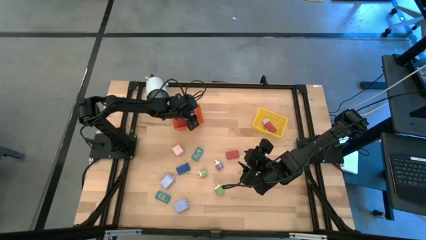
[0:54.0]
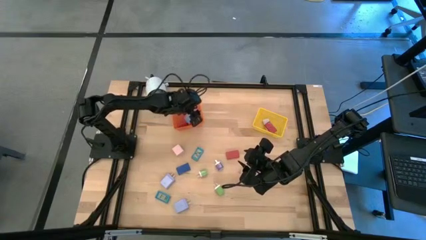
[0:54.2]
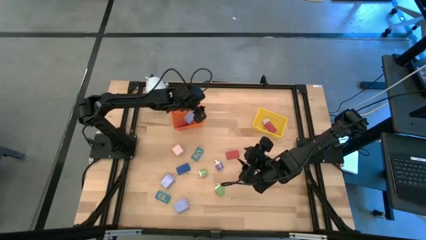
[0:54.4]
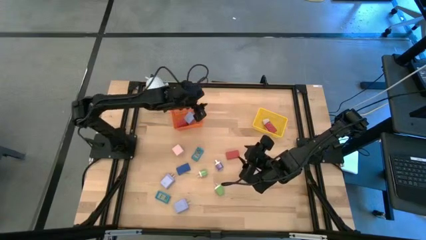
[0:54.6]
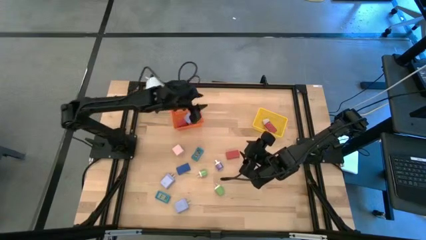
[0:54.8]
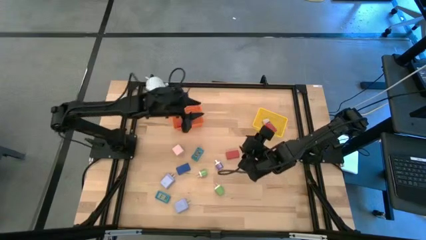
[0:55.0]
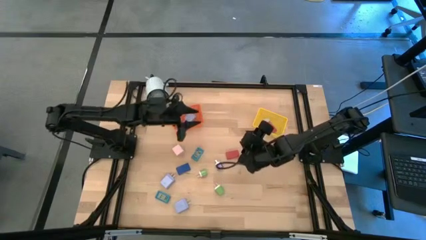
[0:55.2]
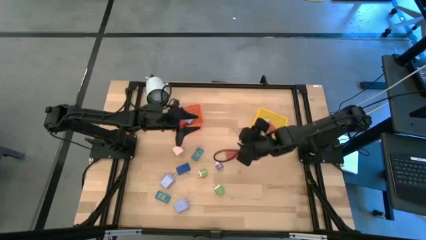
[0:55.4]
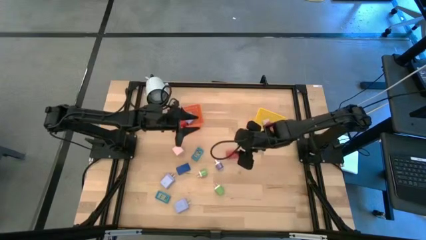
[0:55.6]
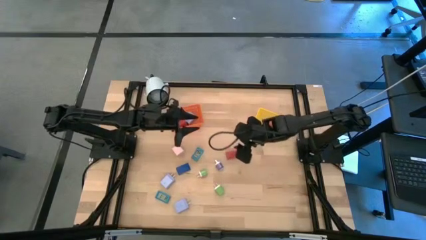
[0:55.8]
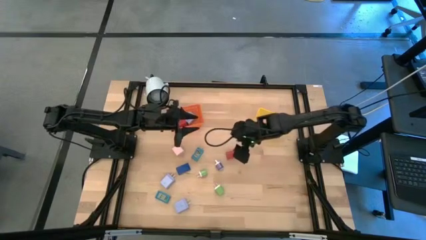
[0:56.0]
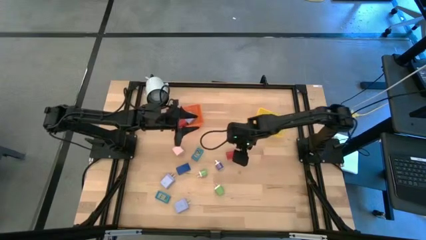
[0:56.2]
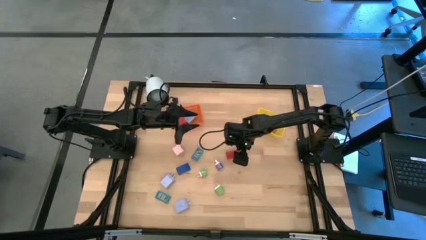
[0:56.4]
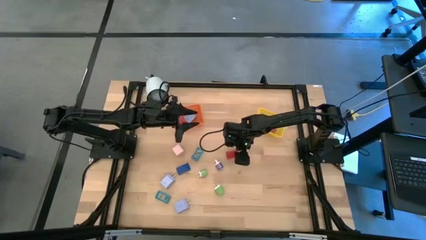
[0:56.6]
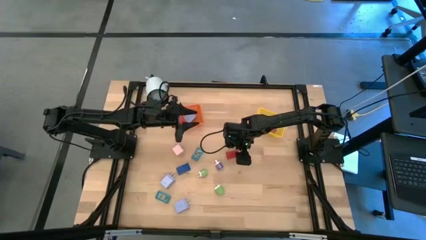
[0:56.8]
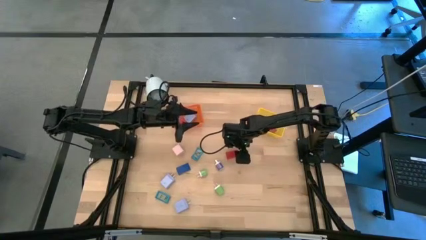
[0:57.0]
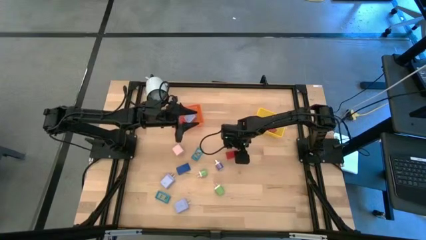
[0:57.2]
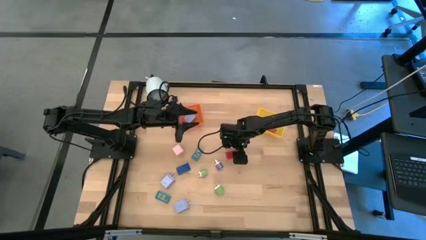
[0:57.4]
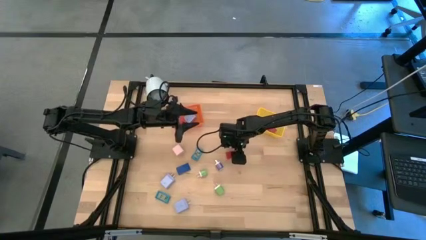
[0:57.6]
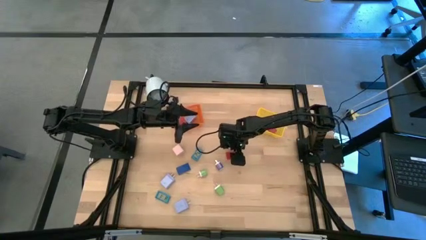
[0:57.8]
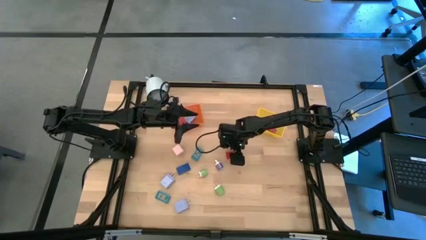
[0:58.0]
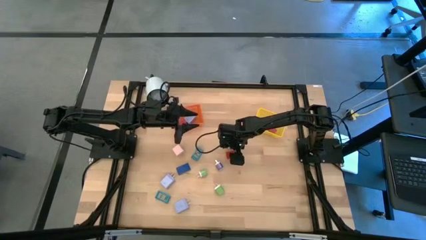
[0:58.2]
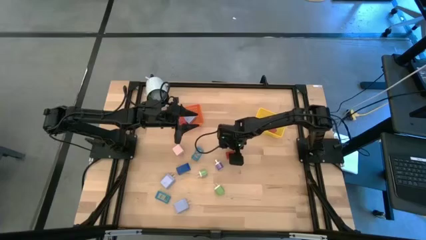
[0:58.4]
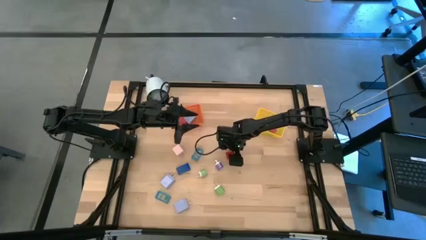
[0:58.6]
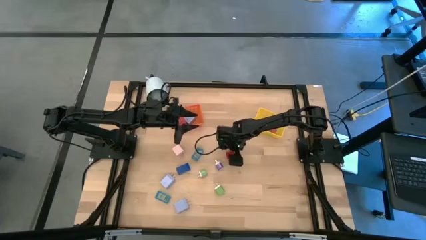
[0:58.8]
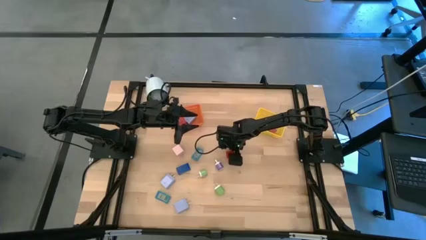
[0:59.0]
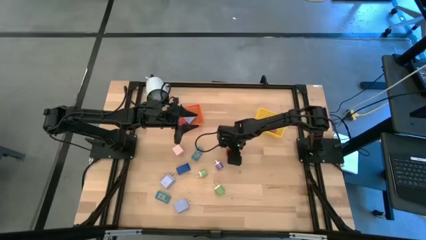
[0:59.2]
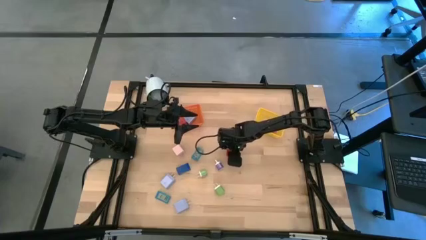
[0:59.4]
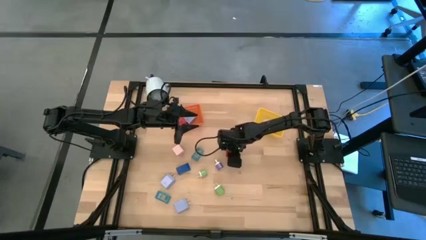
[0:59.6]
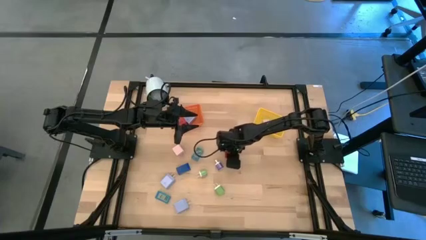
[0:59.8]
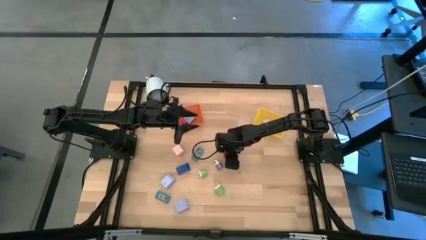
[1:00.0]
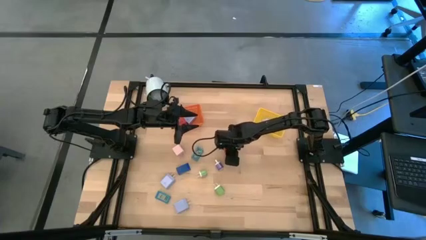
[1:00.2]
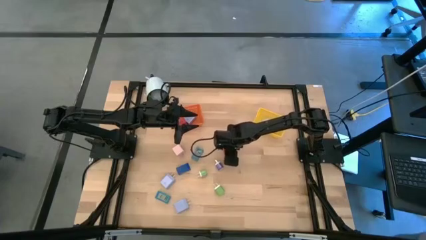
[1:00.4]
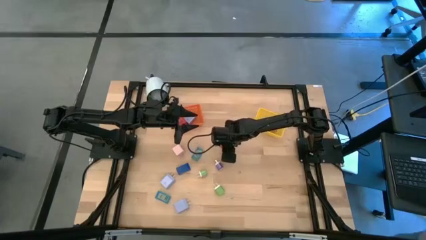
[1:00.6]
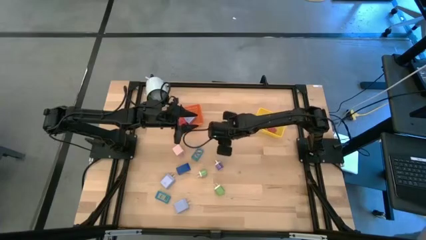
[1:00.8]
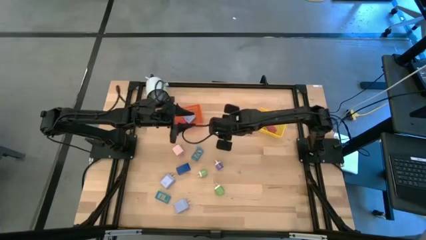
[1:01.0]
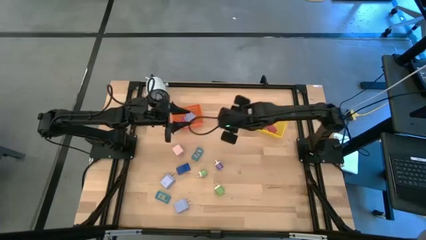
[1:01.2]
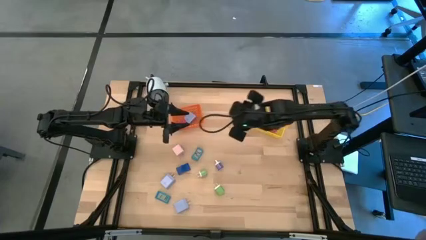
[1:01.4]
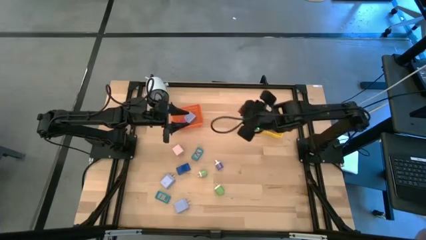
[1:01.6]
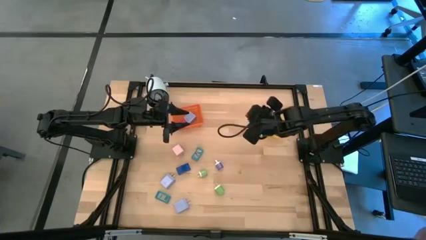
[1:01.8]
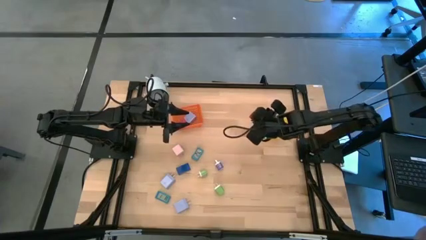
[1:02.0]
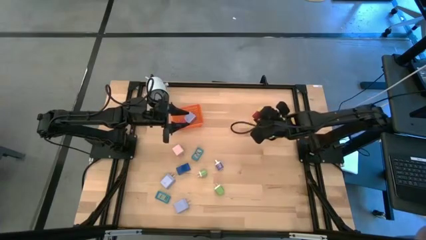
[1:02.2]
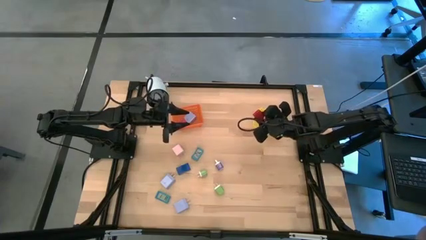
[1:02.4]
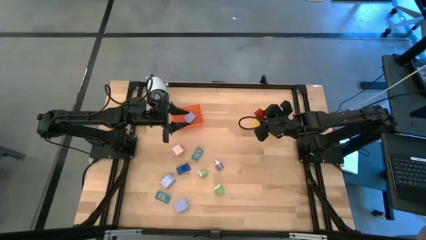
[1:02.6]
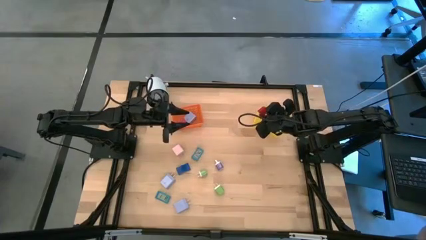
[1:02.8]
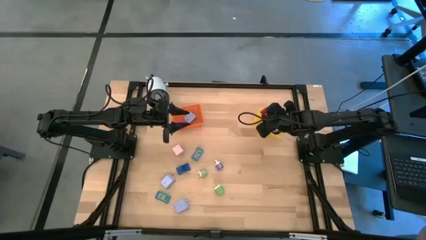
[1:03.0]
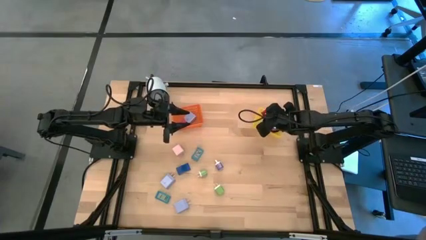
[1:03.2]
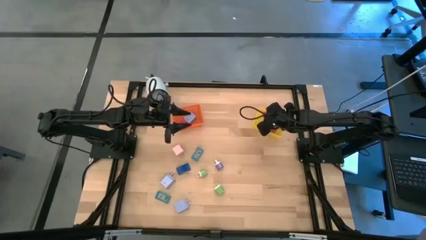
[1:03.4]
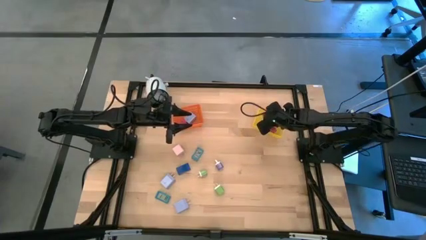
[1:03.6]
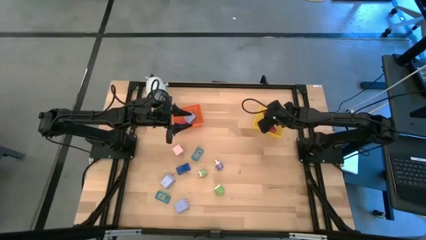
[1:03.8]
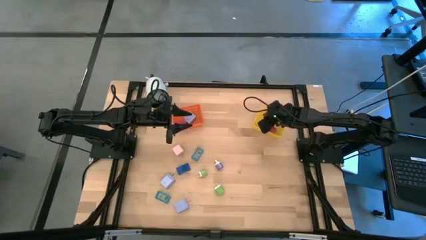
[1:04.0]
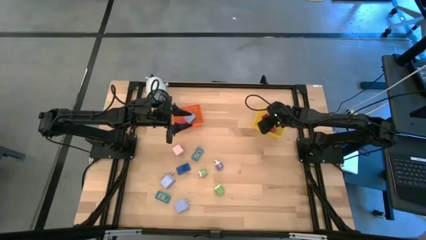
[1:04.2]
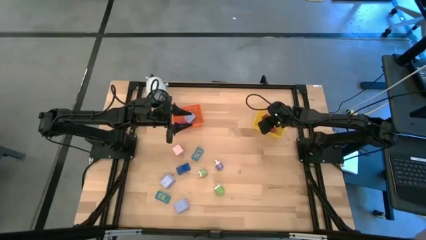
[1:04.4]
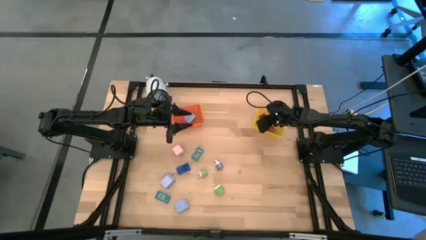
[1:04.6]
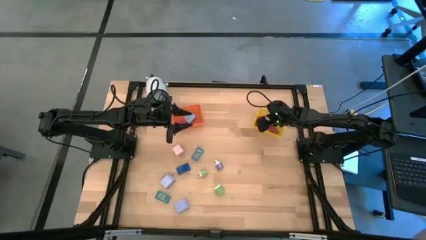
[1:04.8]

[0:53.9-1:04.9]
Task: Pick & Place Office items
Put the red digital clock into the yellow bin
